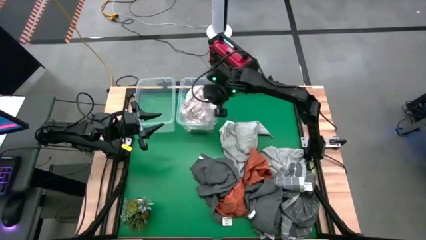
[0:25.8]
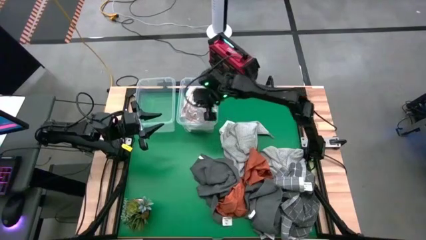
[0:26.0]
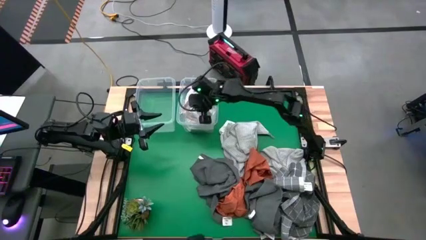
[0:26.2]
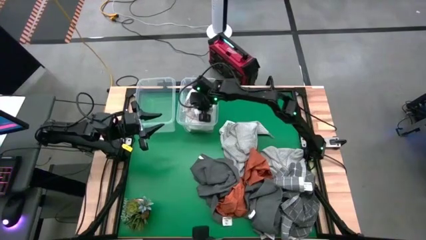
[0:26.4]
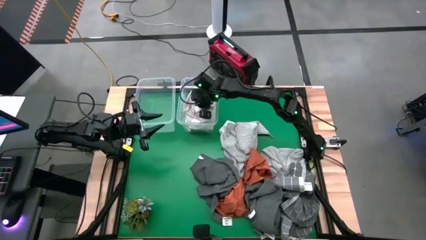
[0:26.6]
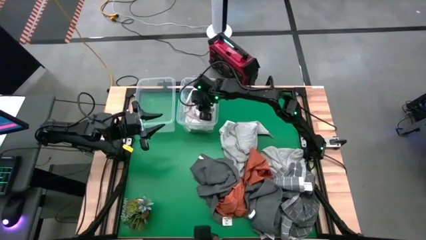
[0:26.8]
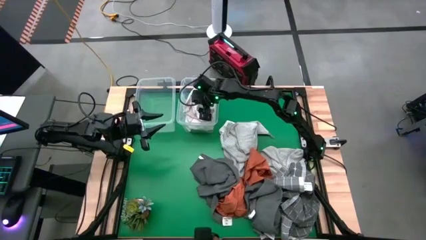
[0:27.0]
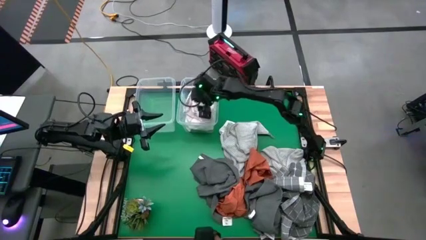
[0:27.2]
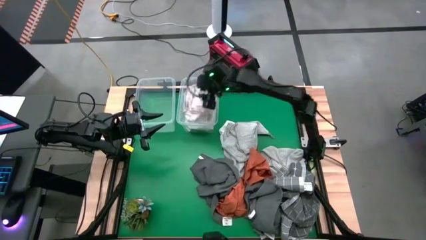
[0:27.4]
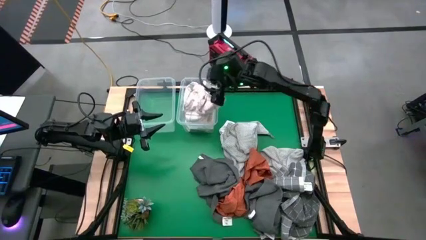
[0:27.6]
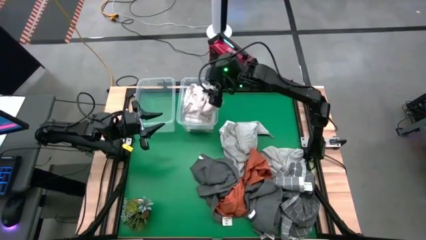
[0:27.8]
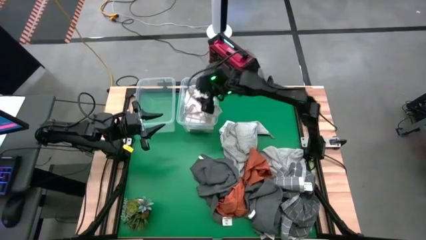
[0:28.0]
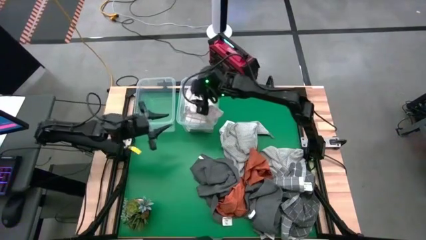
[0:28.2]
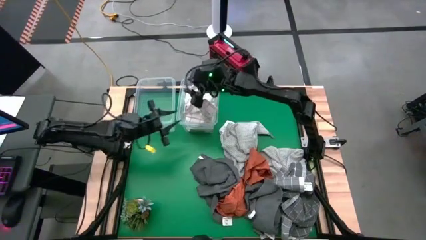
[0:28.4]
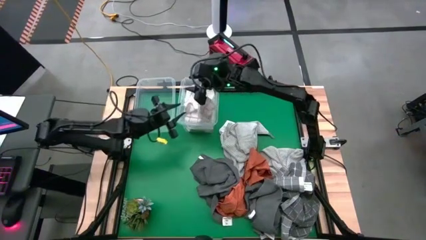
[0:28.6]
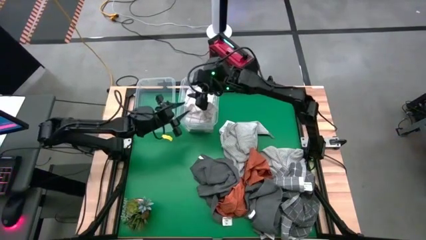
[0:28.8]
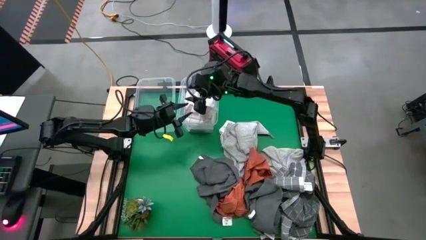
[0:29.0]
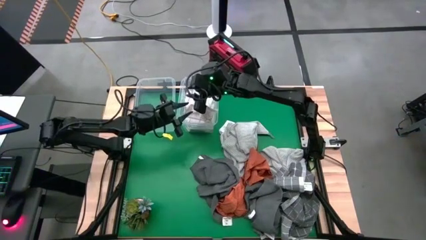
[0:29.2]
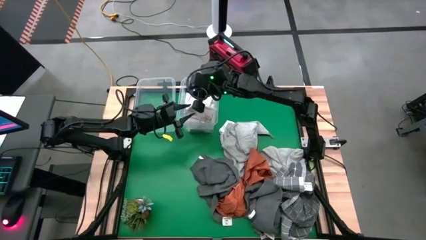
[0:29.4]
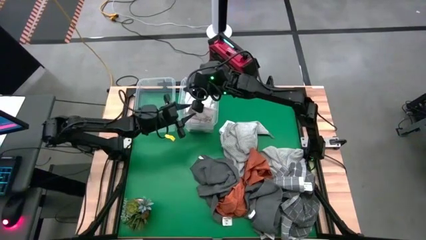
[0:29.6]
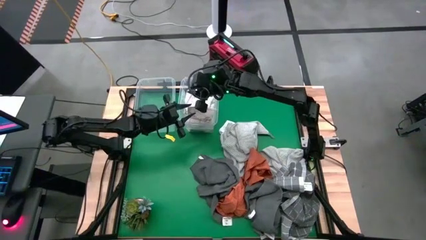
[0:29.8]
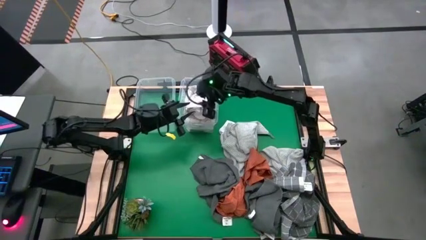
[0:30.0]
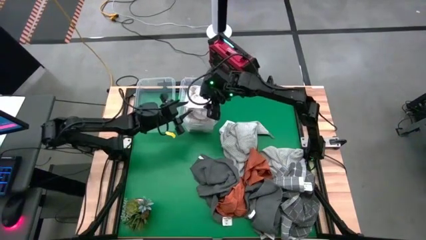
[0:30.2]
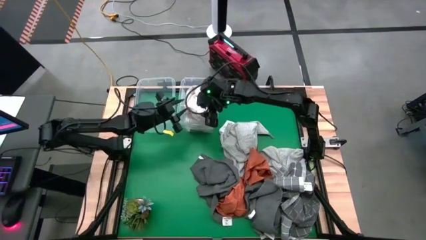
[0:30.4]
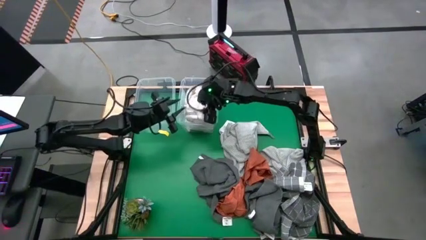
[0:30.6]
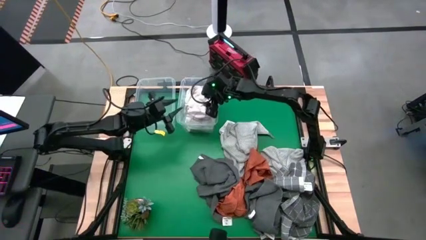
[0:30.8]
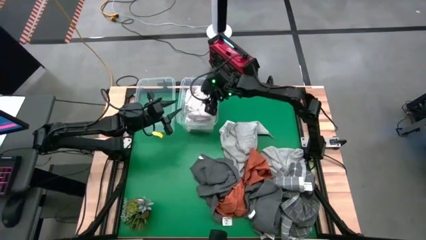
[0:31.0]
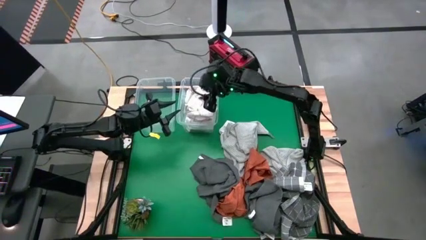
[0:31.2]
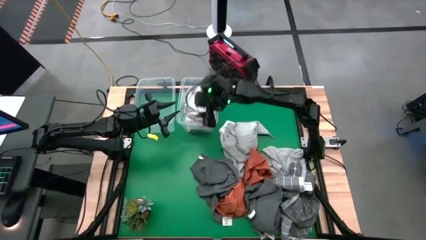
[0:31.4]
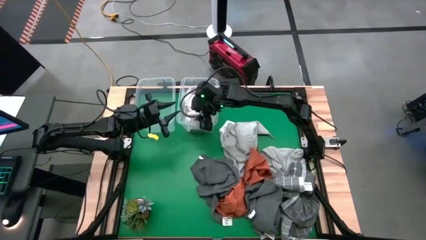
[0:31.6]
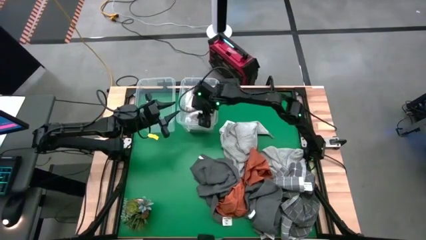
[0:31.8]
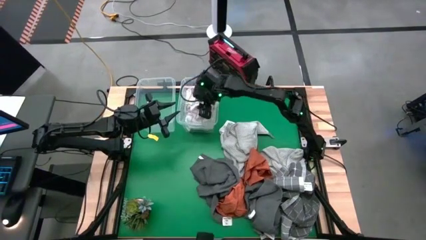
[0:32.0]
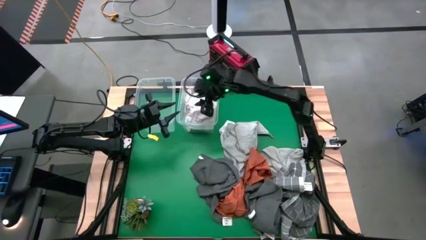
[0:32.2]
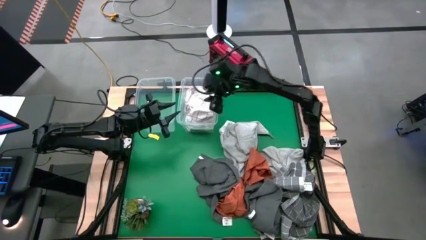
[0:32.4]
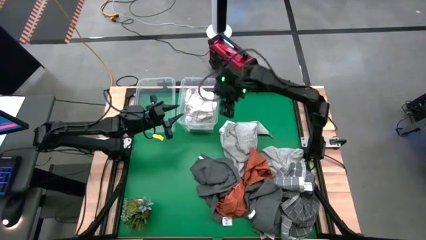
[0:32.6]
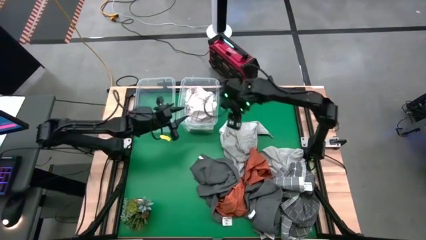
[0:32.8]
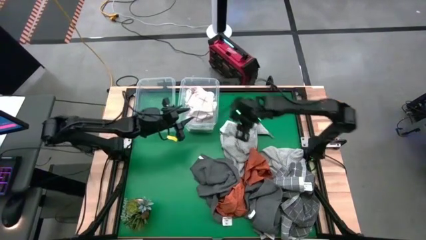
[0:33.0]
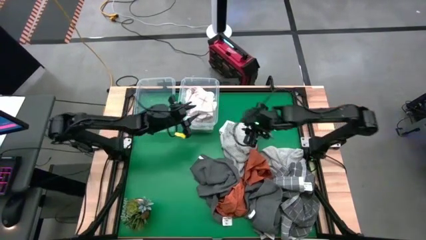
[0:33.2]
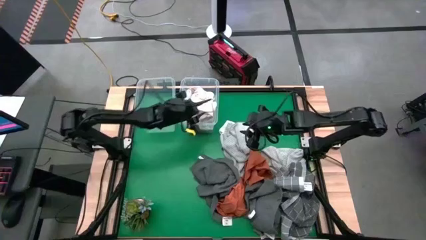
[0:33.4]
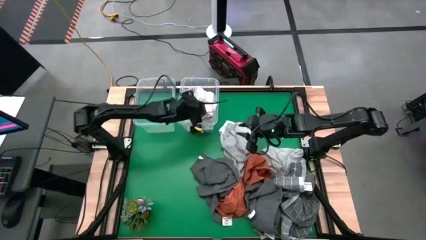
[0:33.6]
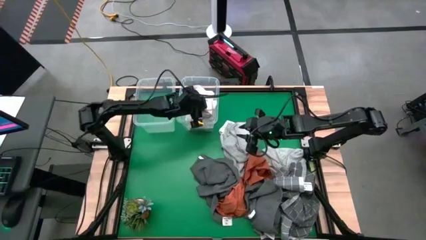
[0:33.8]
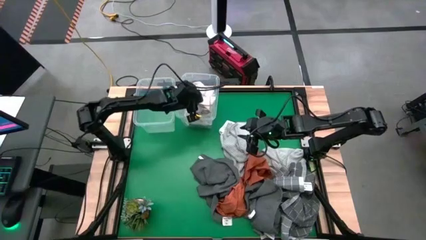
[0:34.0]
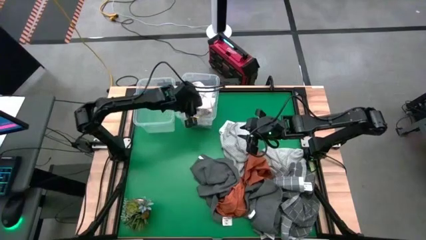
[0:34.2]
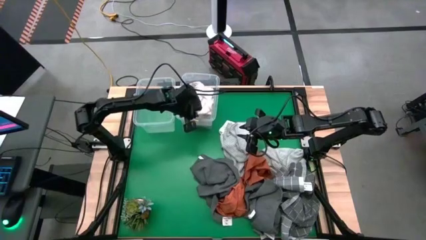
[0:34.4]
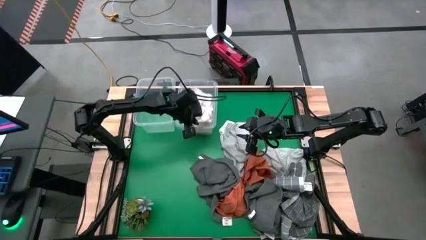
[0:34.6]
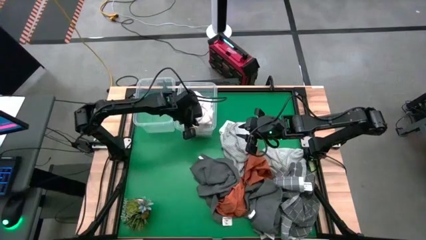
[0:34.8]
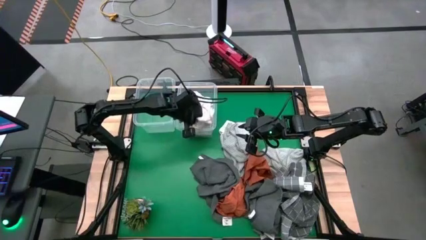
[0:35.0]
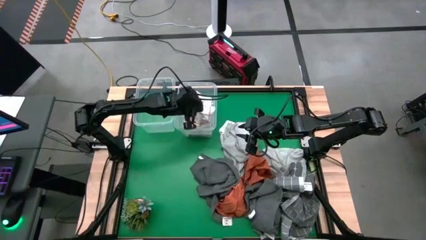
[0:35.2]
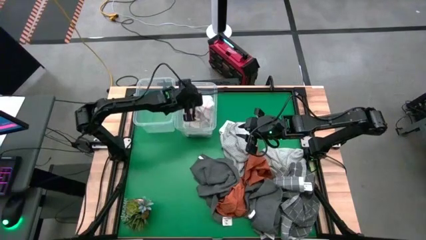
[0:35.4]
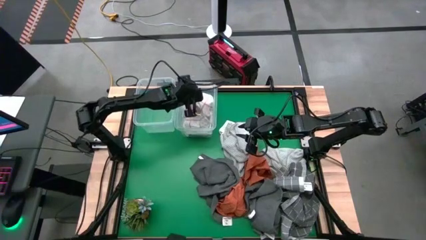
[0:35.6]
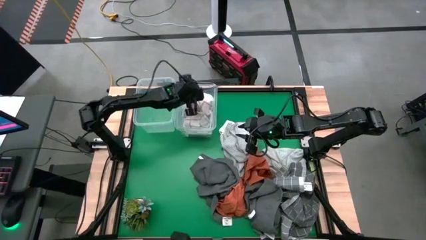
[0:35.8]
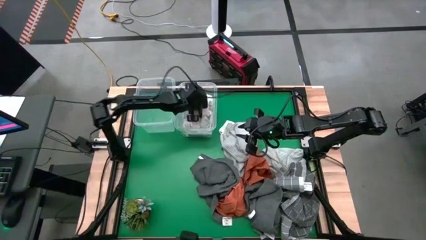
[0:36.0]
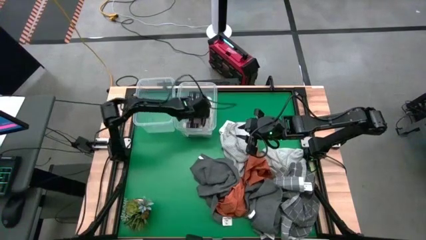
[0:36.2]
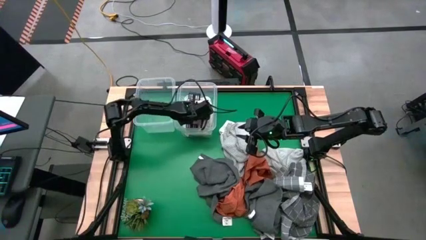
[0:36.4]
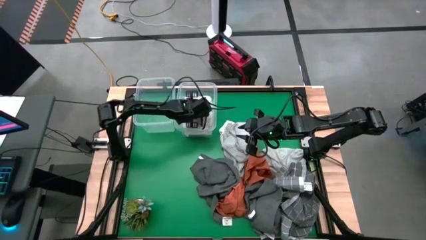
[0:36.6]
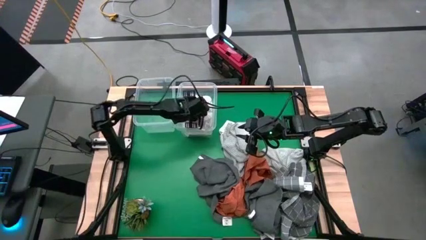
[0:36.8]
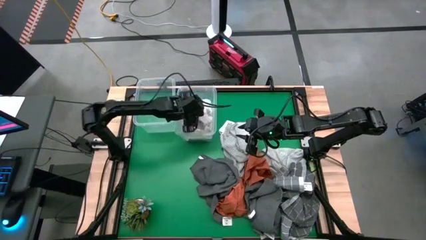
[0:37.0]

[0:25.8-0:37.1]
Task: Sort towels by color in basket
Put the white towel into the right transparent bin

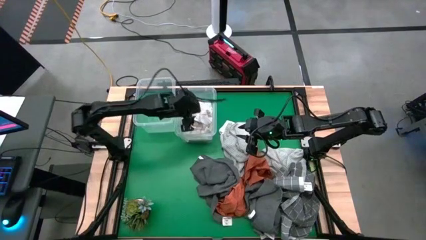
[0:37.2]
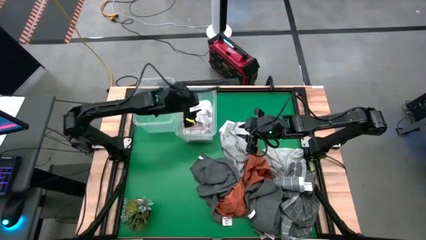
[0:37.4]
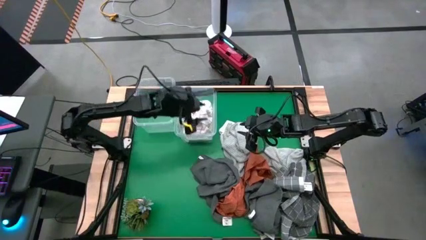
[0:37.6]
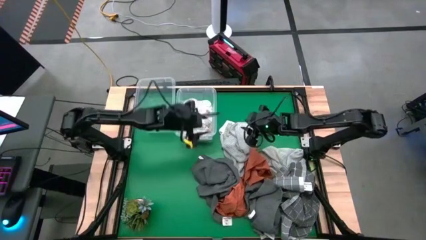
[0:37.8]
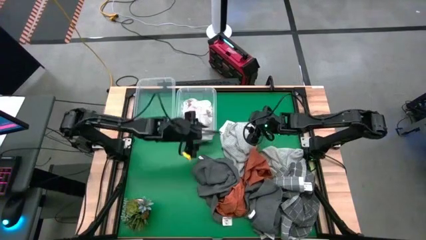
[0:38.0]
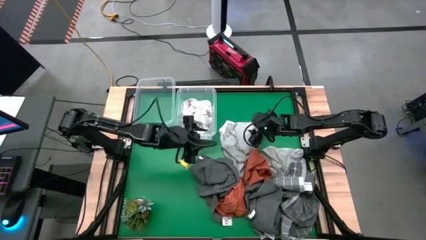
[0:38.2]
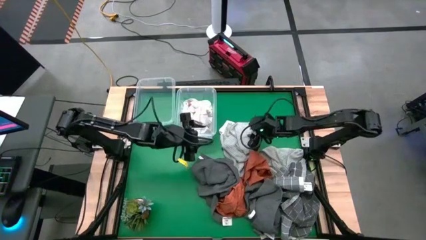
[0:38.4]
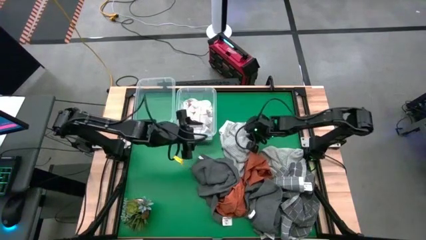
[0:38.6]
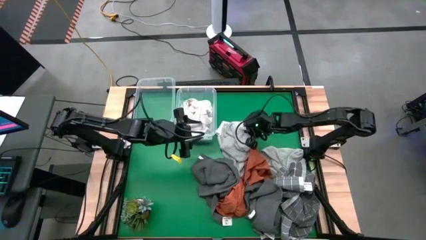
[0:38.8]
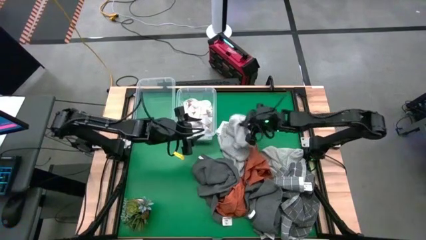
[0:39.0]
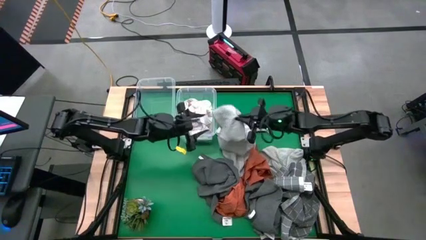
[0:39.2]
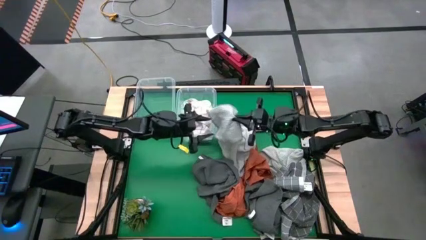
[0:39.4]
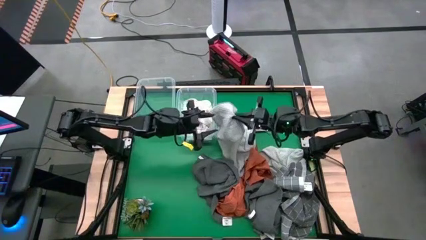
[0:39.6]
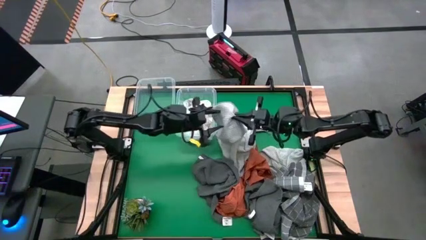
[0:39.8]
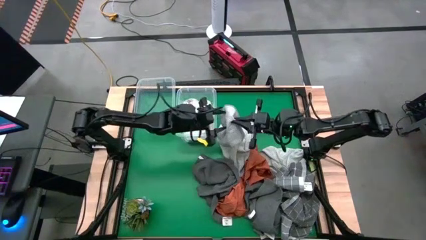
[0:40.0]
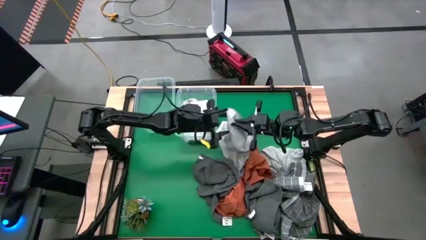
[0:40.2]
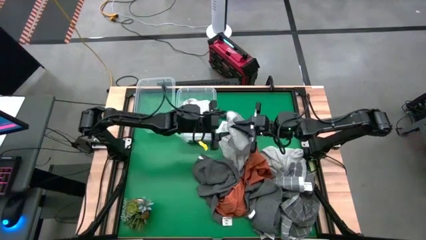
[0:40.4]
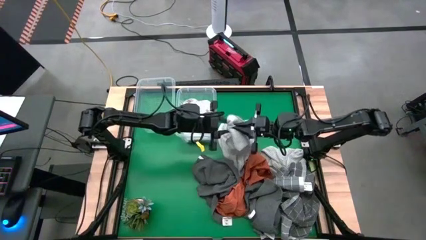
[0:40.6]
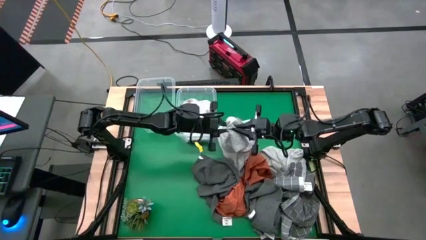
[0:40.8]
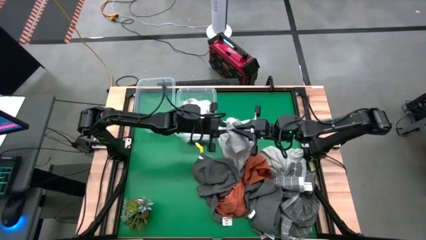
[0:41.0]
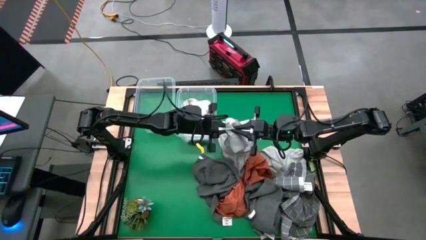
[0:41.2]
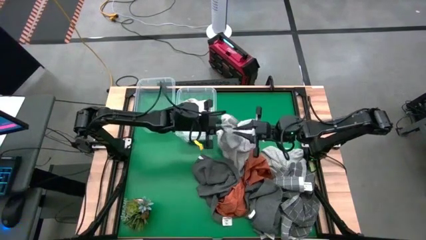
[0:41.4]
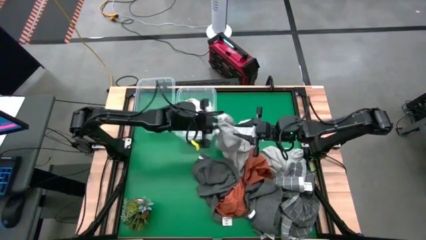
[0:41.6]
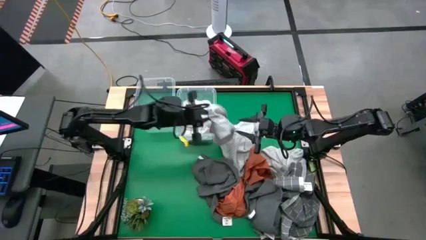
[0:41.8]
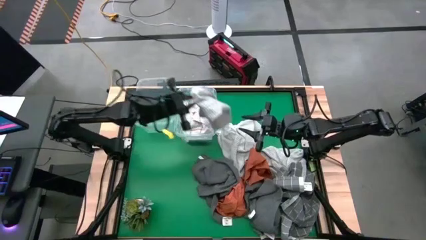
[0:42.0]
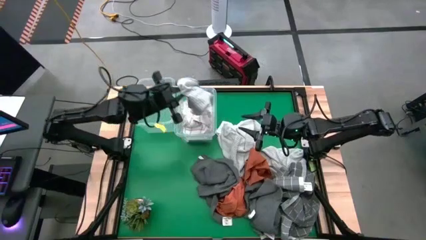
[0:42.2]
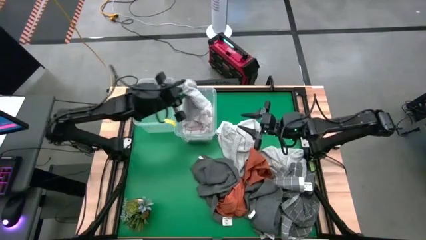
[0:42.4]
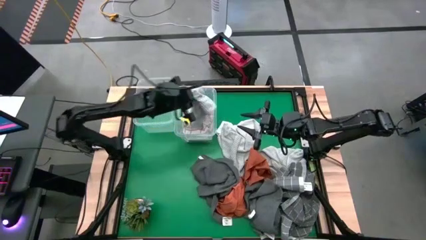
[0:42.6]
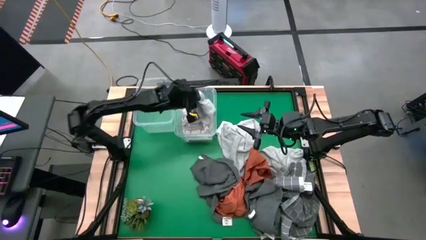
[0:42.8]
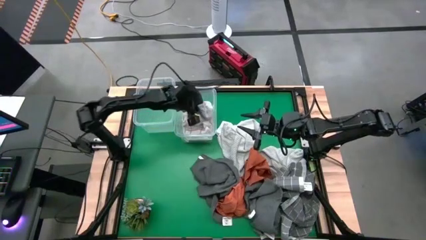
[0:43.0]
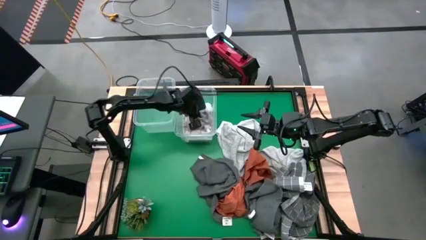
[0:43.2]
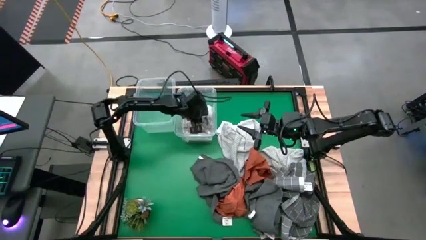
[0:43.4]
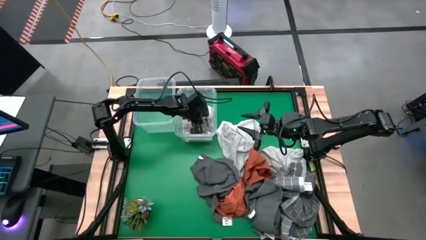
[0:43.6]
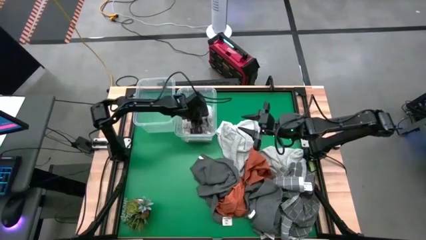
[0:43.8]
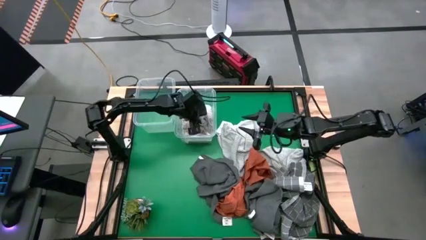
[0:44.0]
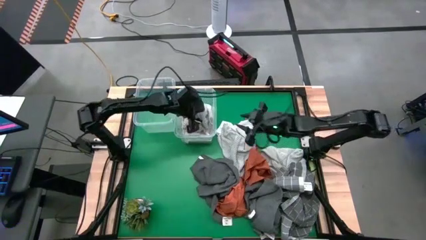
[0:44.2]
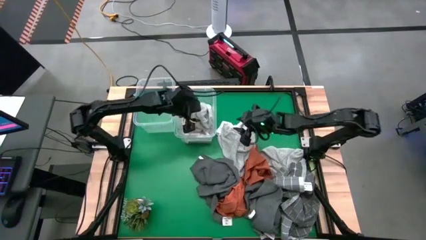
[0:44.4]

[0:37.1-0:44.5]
Put the light gray towel into the right transparent bin
